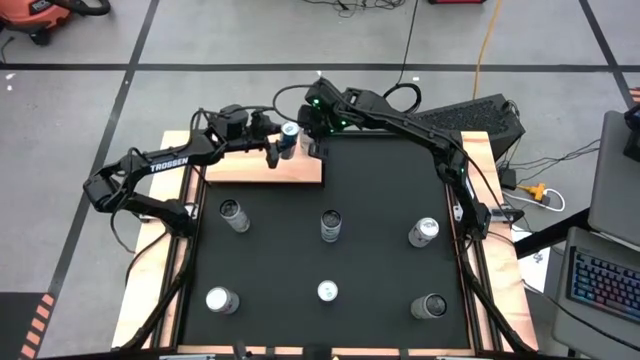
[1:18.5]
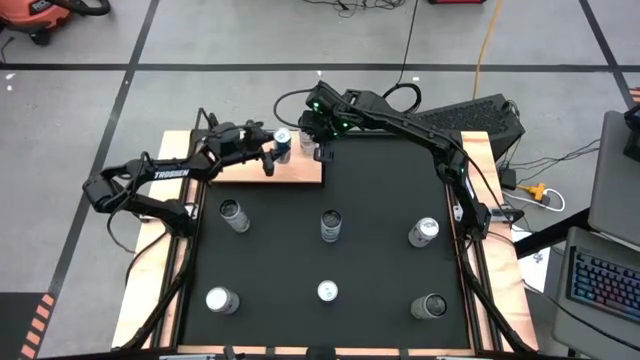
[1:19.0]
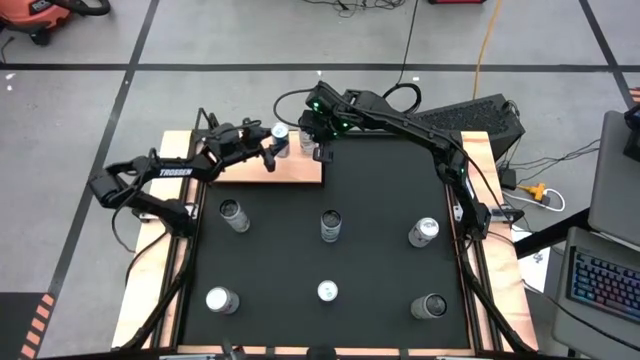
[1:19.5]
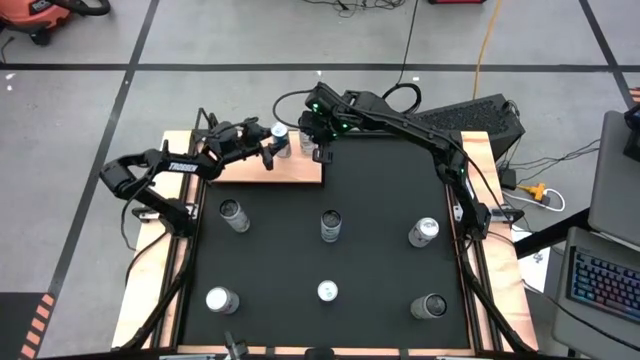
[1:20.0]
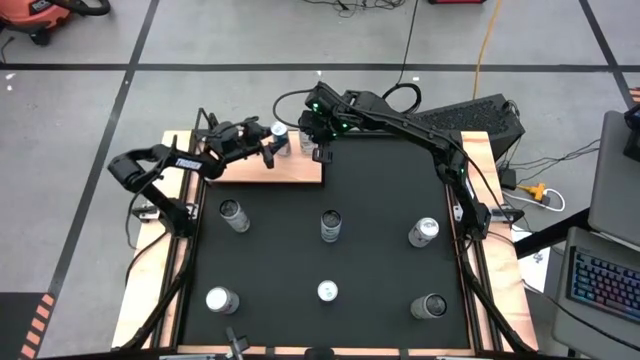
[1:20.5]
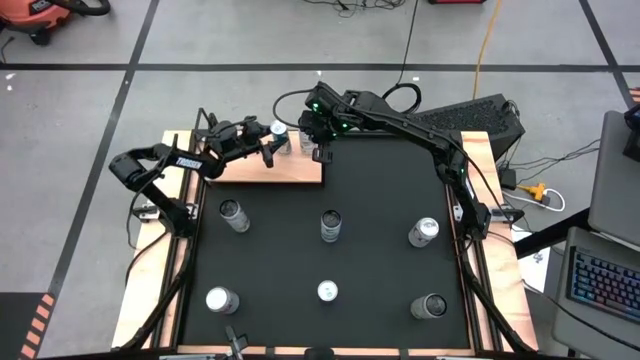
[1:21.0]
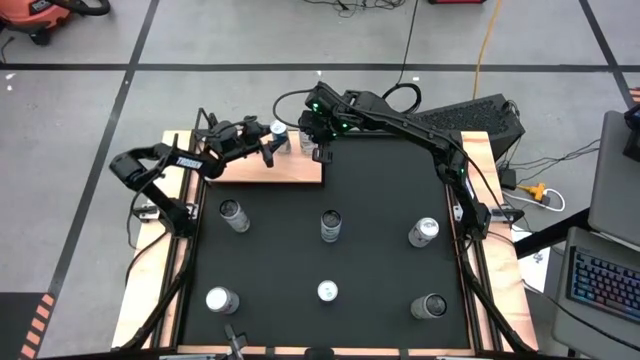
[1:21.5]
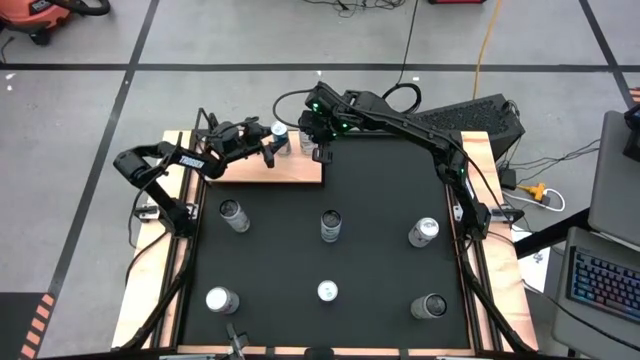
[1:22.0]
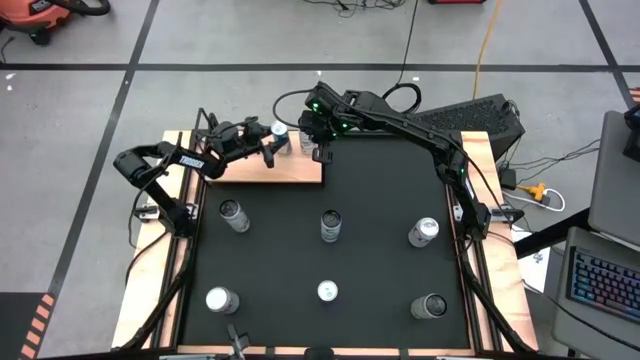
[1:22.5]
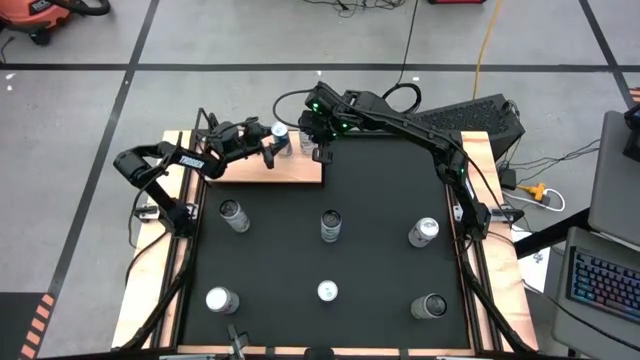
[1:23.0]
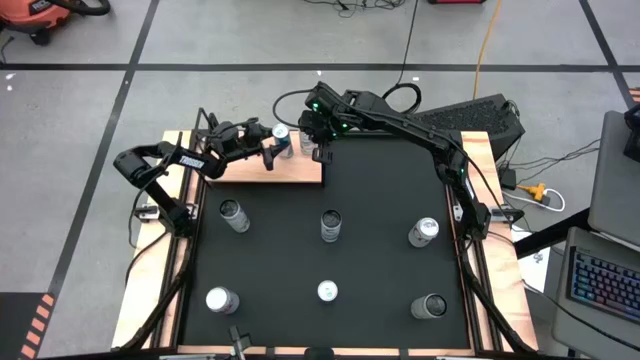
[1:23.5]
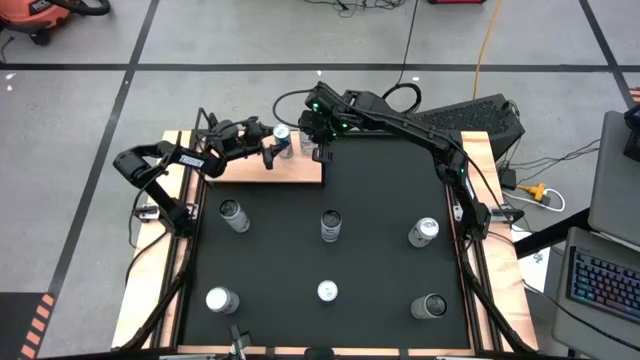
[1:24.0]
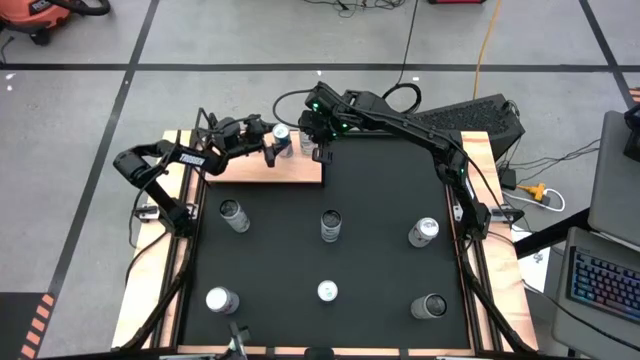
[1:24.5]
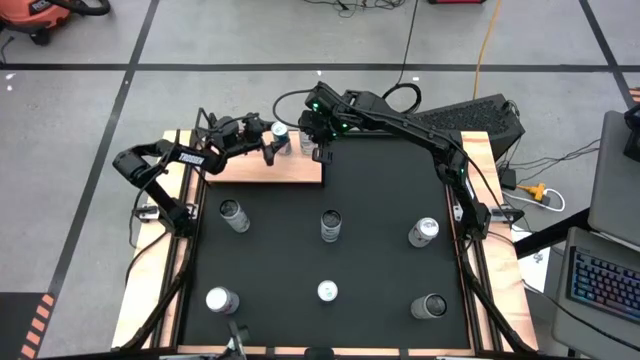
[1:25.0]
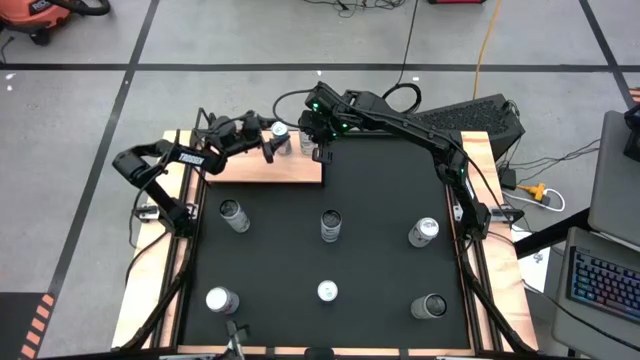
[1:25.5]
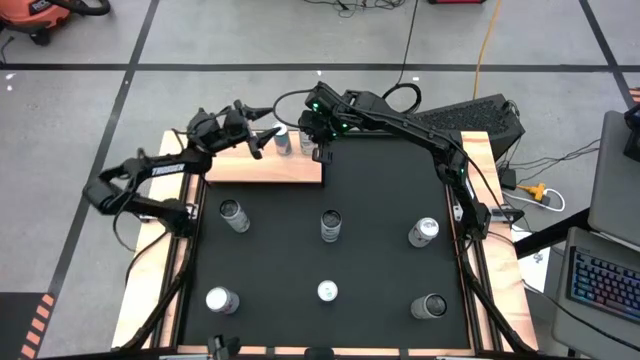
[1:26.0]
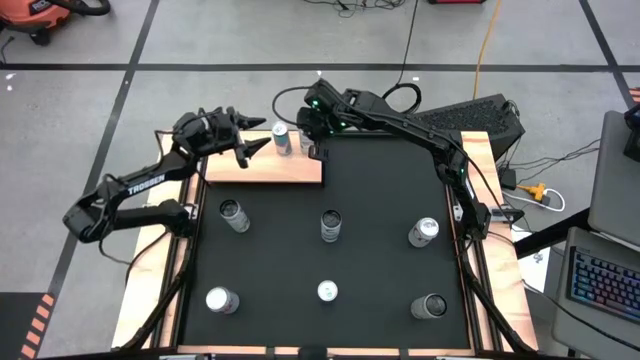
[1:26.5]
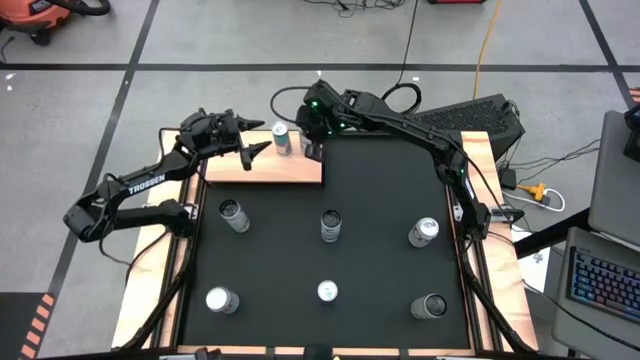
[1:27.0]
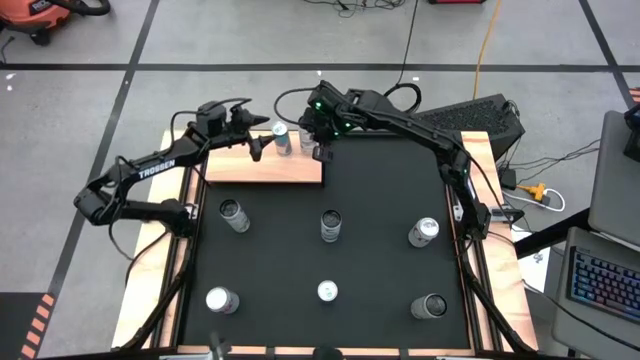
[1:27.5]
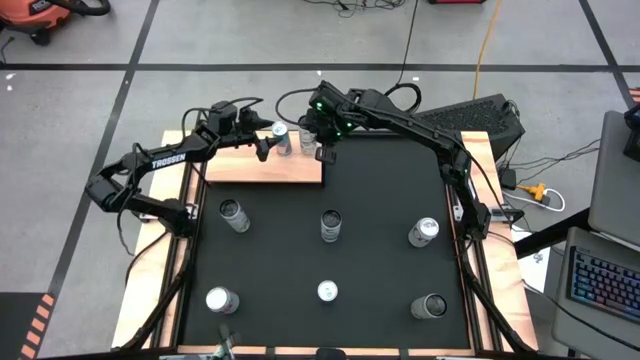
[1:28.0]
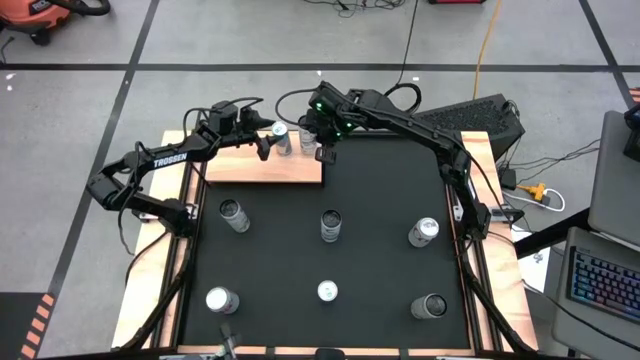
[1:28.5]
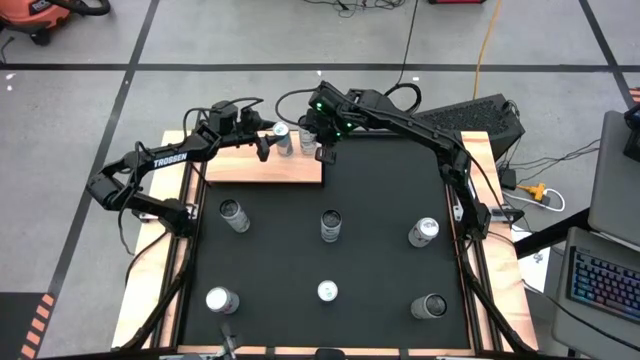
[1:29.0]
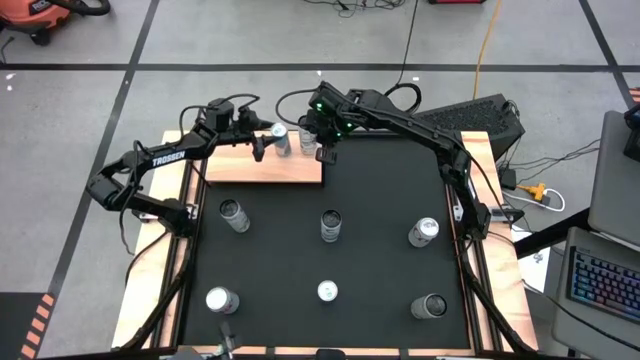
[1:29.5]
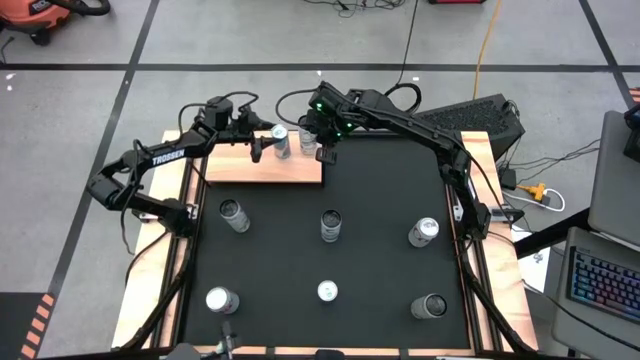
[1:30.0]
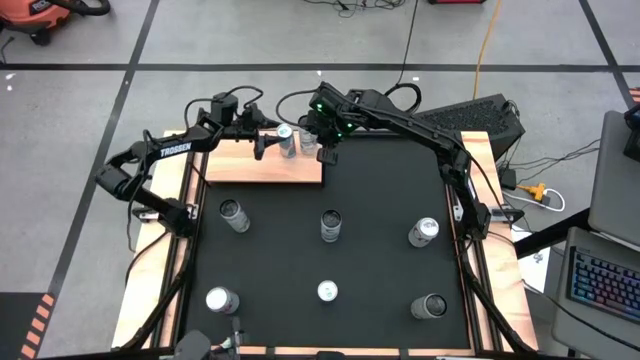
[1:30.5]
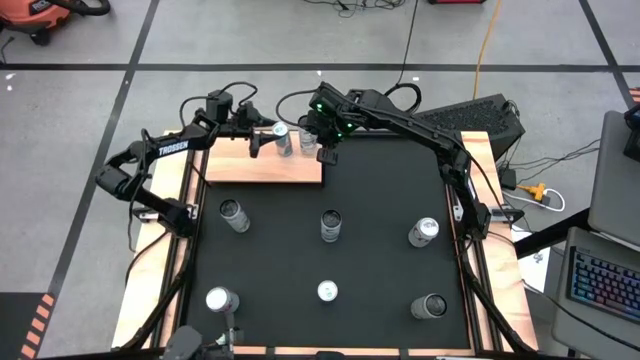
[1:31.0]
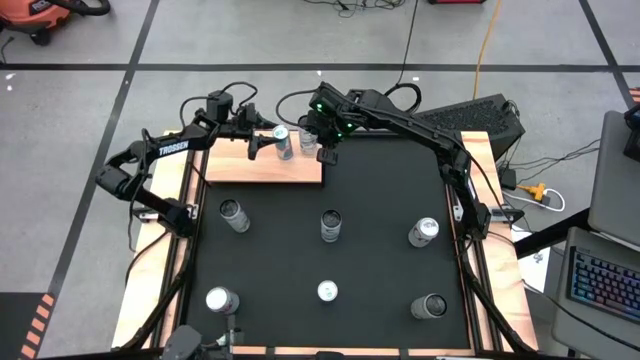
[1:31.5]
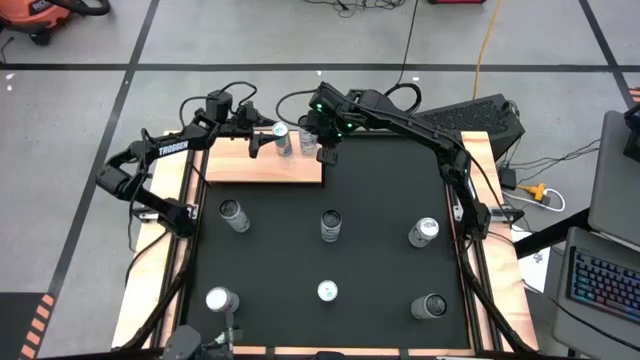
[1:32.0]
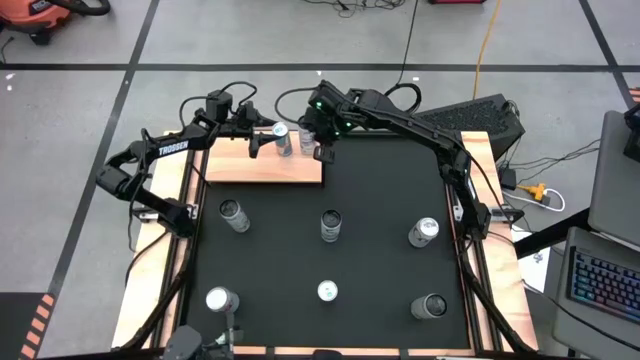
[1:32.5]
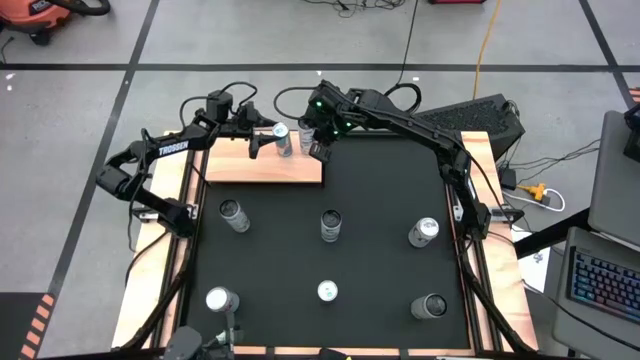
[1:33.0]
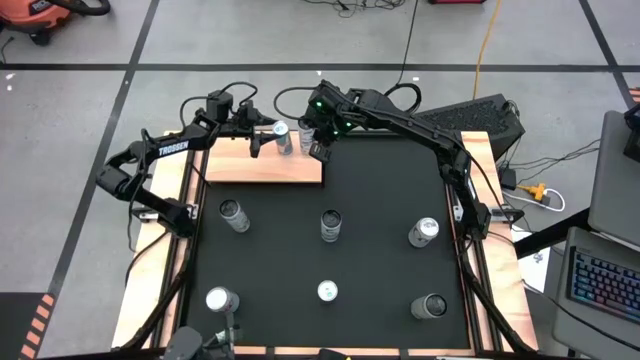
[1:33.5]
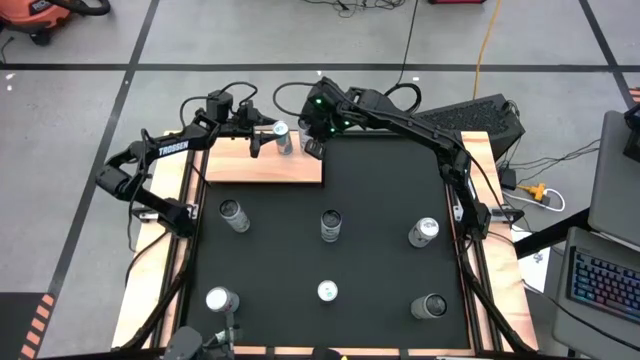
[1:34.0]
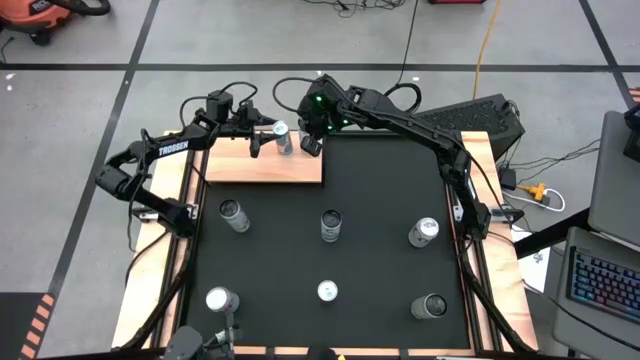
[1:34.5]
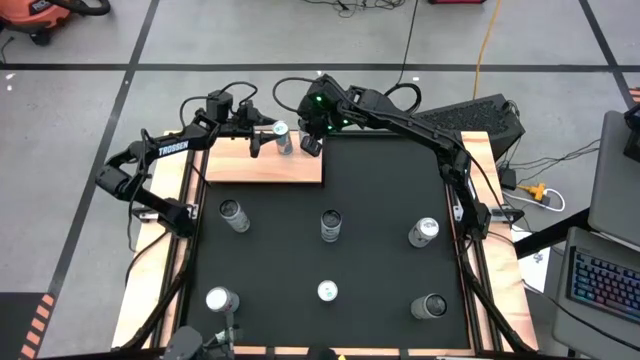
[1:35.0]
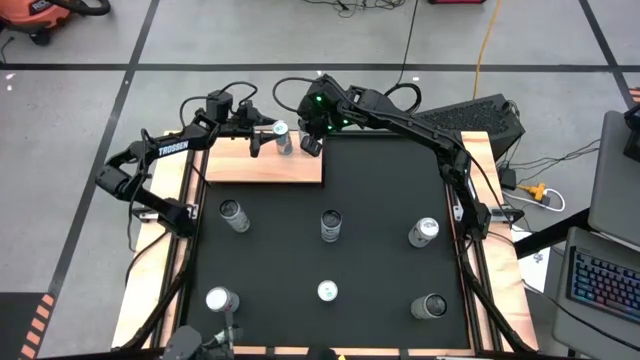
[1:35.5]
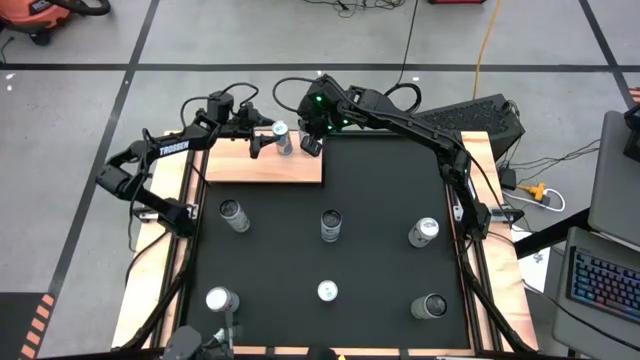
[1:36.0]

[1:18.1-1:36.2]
Task: Place canned beverage on shelf
Put the top blue soda can on the shelf

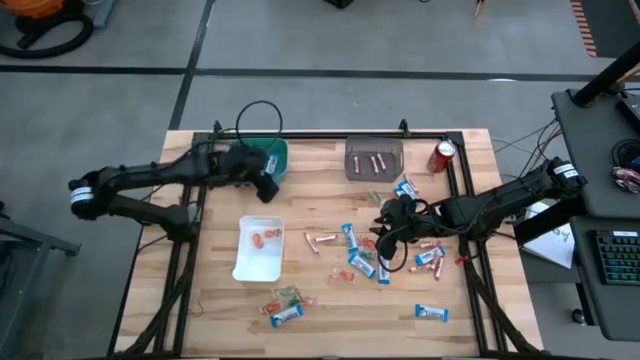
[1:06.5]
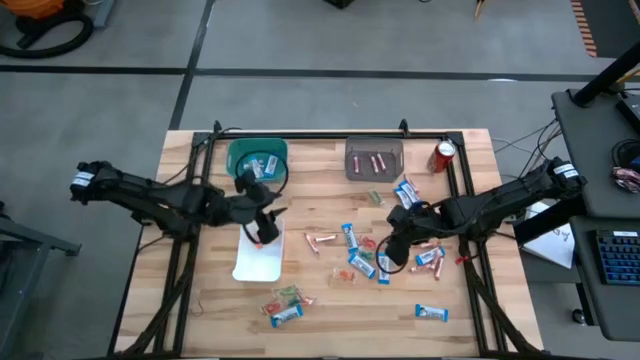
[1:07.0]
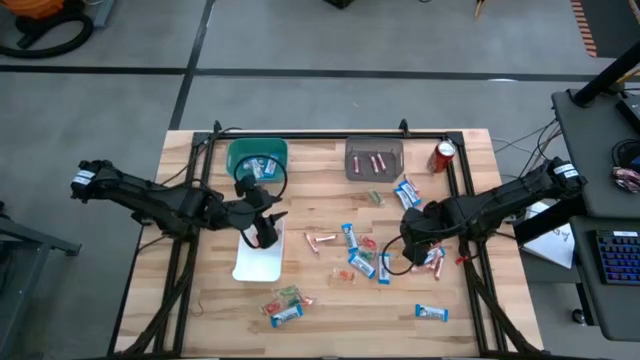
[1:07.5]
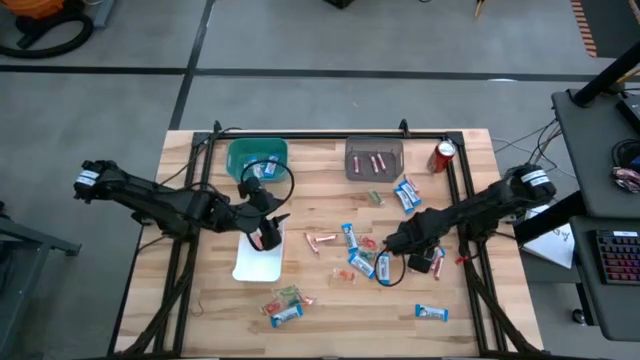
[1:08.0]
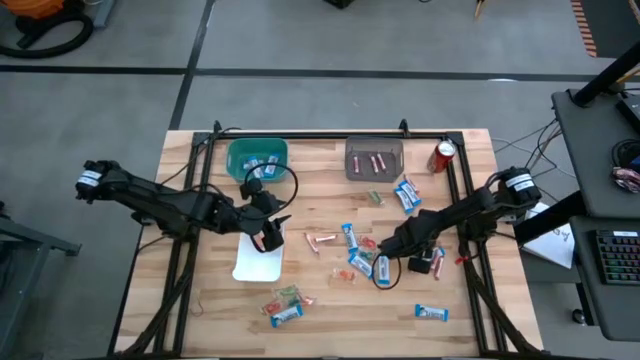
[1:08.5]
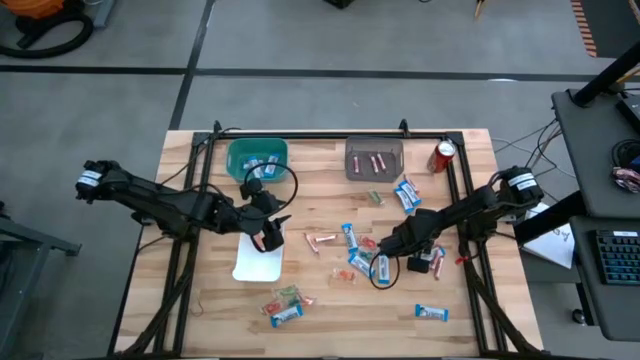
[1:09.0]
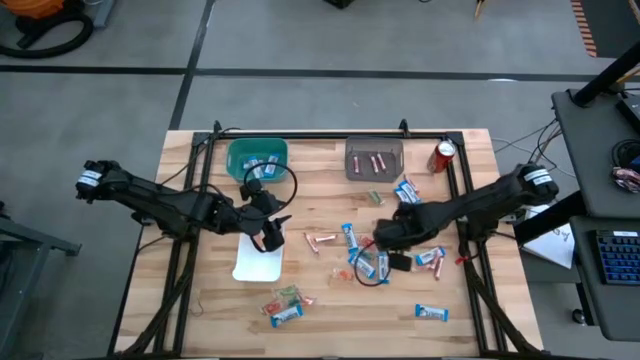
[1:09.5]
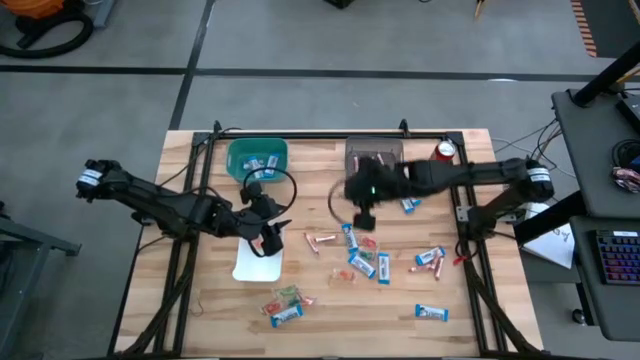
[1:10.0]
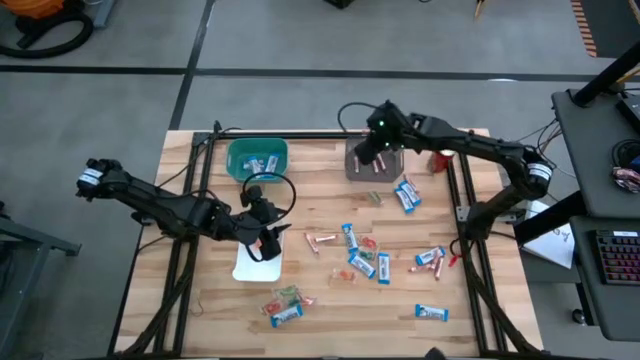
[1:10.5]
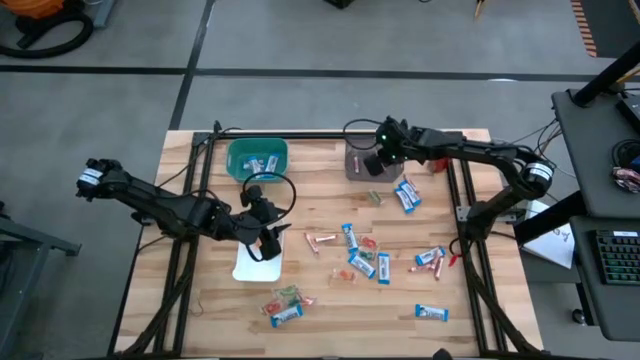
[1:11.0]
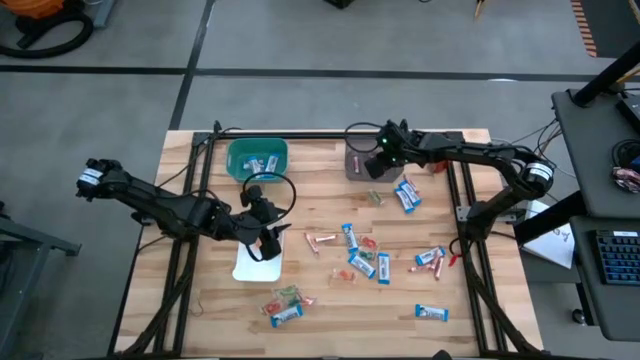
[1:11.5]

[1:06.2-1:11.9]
Task: Sort candy
Put the transparent candy rolls into the black bin
